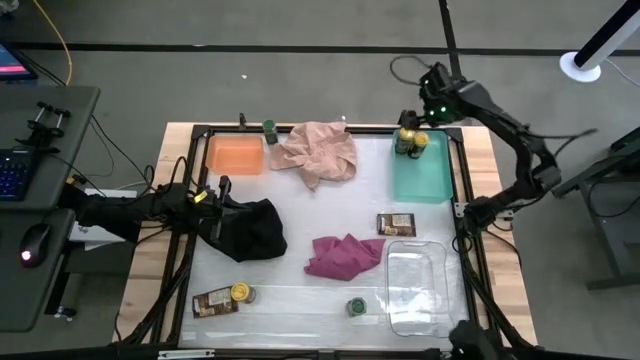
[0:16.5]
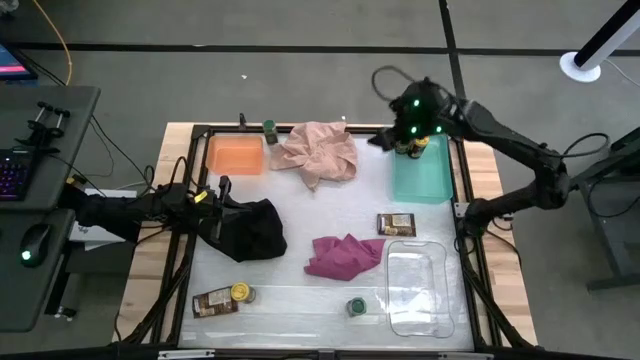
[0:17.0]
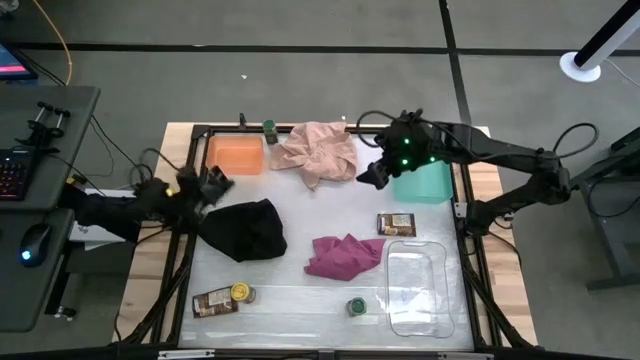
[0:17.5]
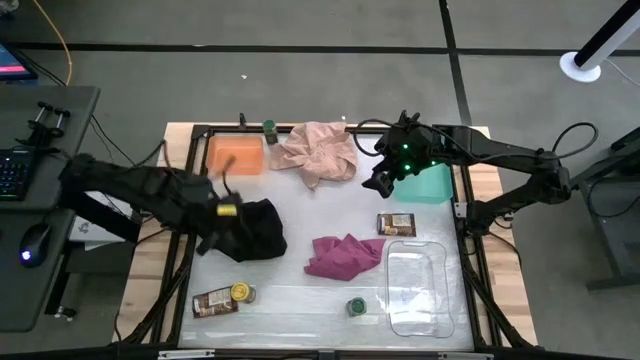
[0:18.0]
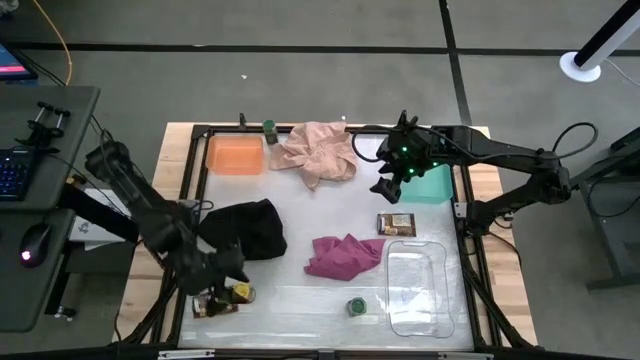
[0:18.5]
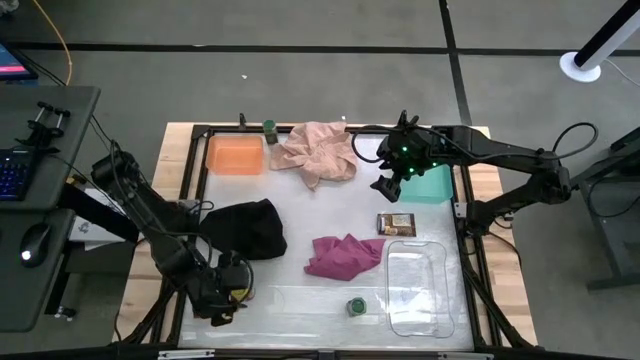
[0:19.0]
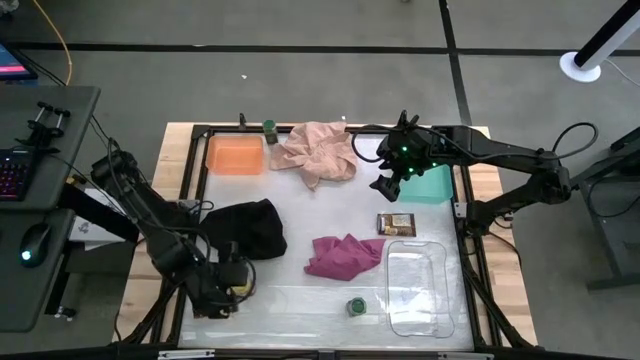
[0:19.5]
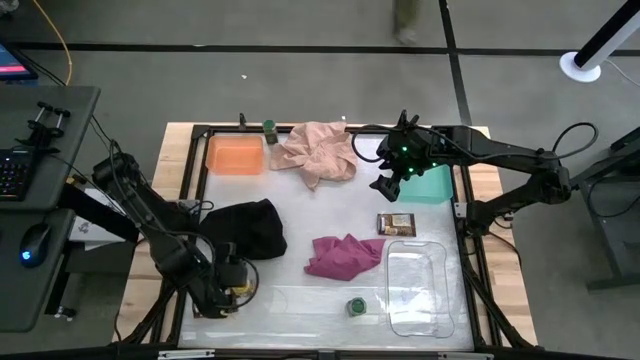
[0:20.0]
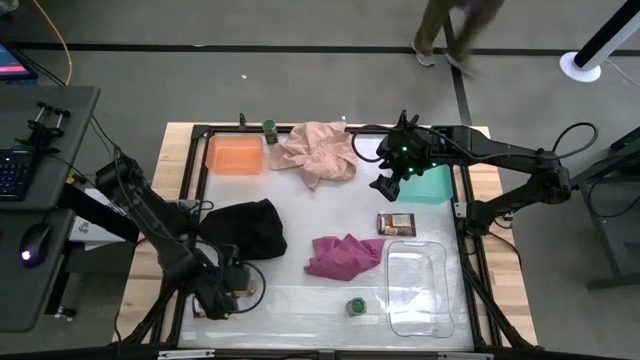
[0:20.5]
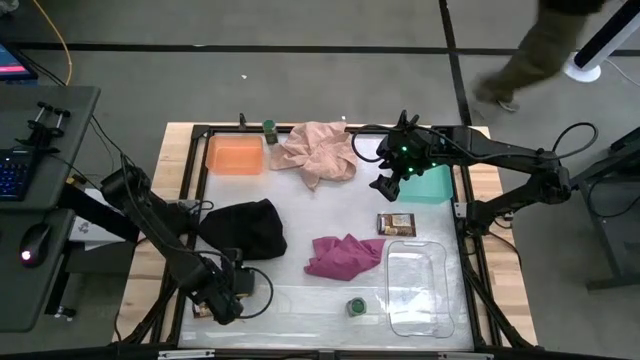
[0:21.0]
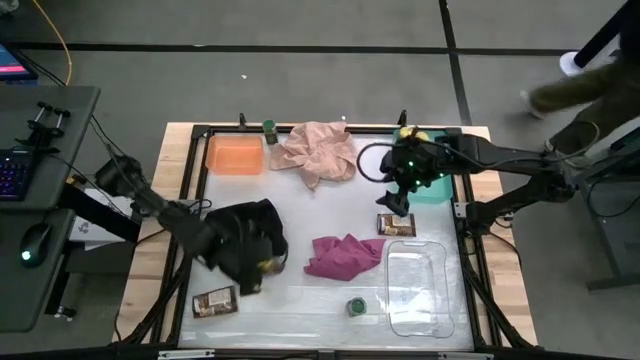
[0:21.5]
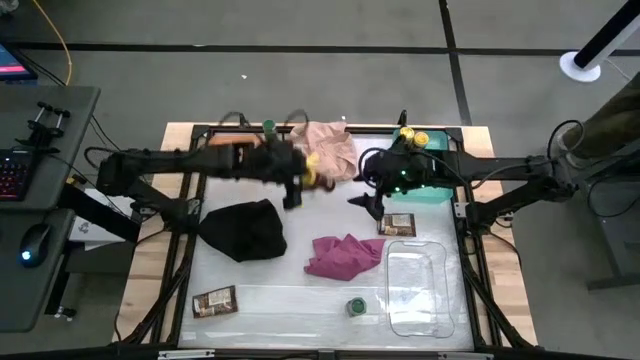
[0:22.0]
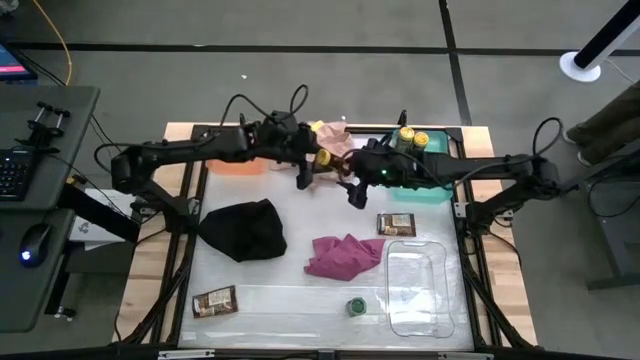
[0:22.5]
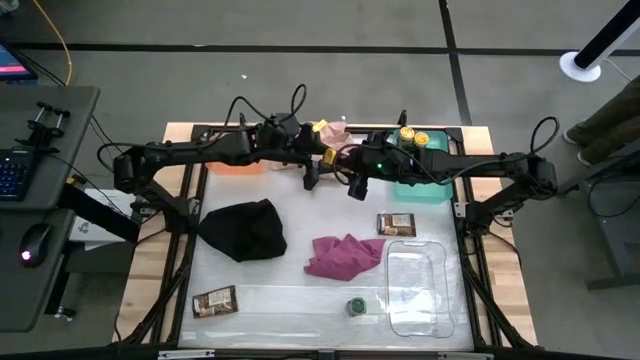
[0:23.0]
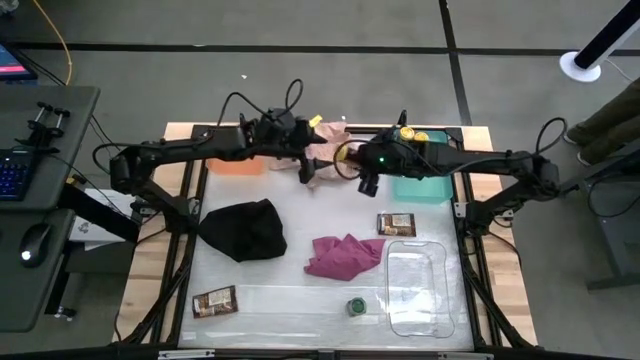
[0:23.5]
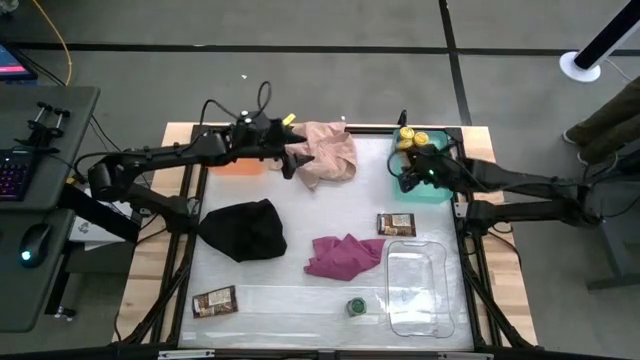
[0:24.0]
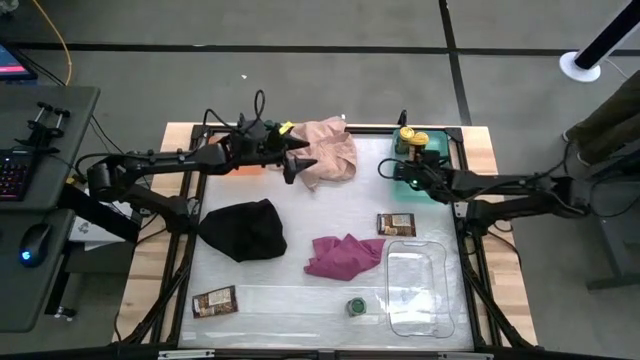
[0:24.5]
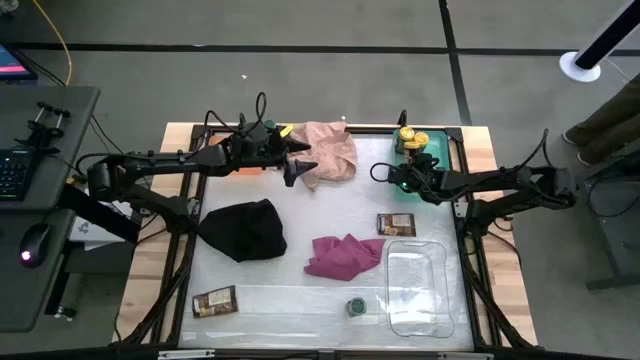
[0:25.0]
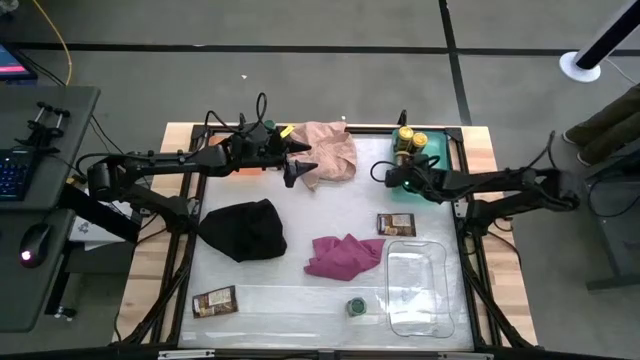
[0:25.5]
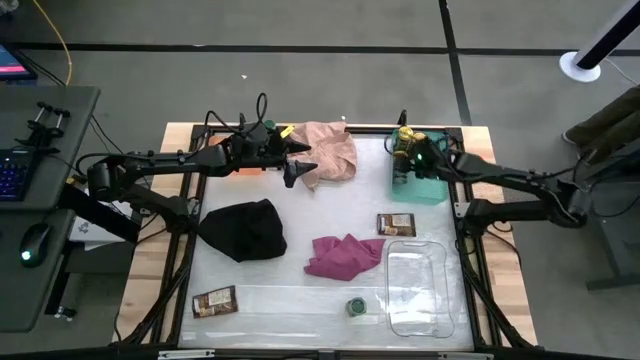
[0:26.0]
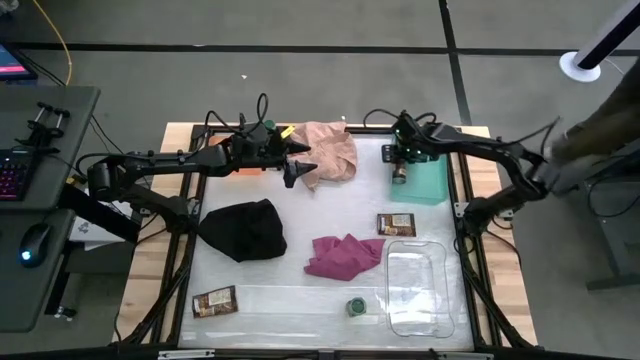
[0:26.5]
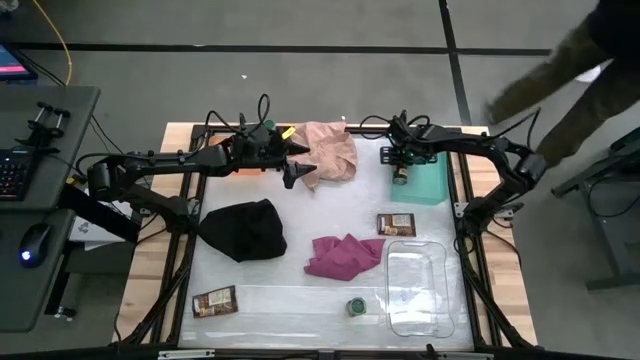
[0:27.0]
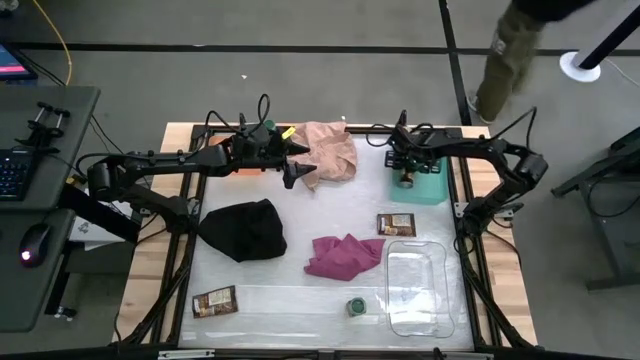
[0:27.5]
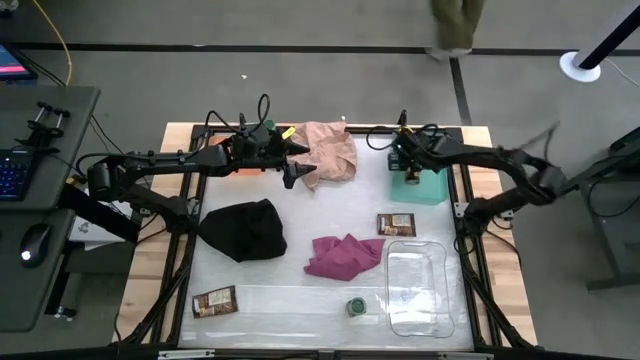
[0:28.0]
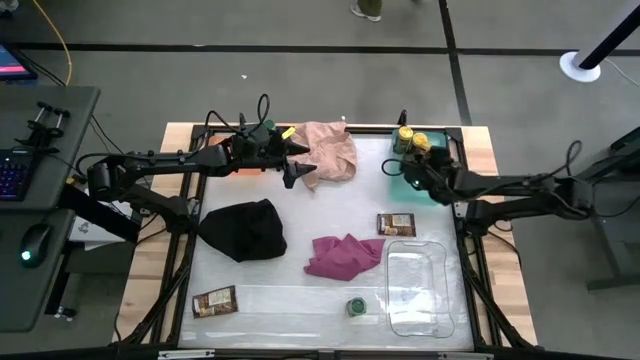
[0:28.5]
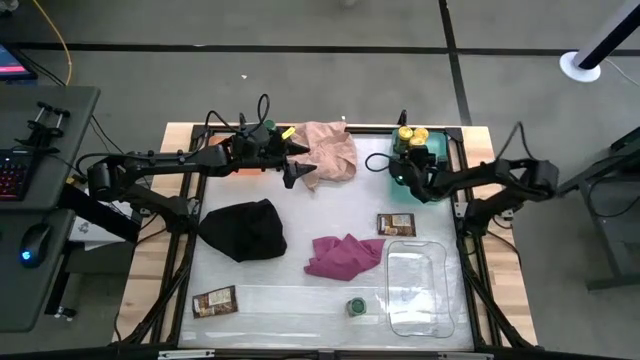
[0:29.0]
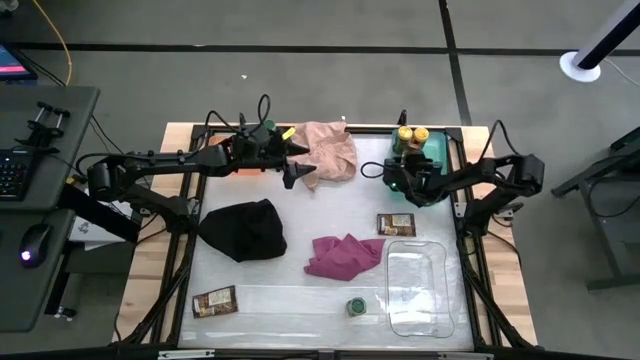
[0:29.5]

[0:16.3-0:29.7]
Task: Sort spices by type
Put the yellow seasoning bottle into the blue bin

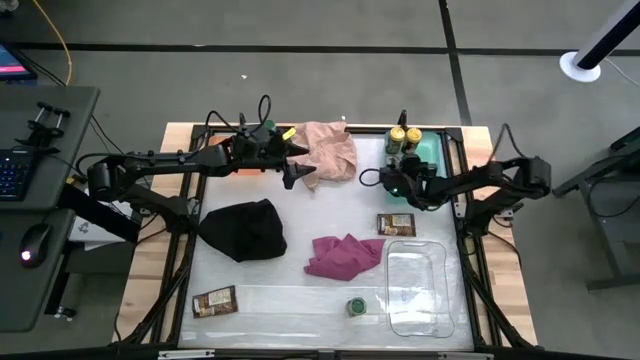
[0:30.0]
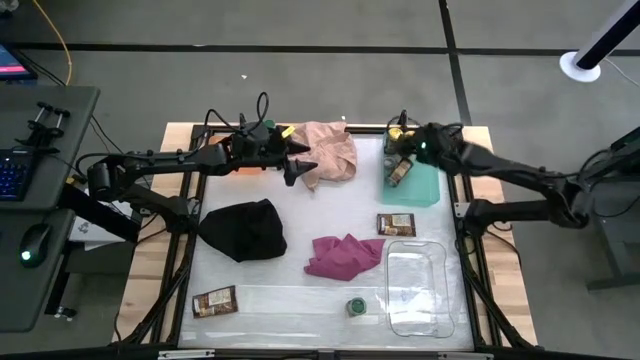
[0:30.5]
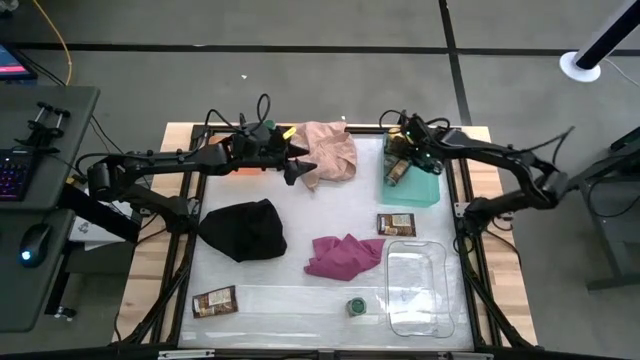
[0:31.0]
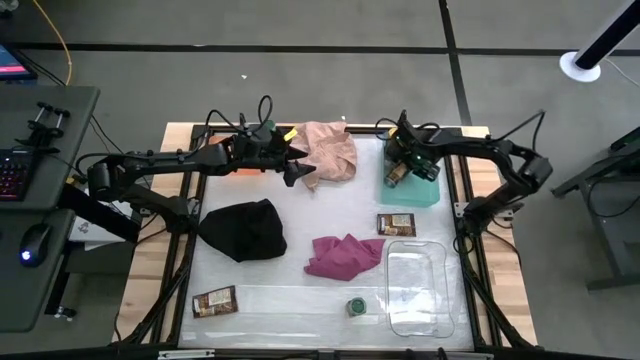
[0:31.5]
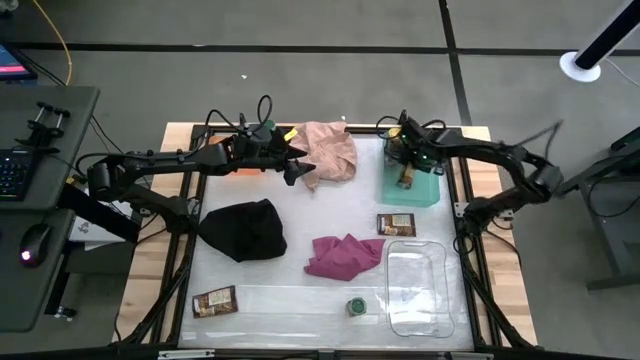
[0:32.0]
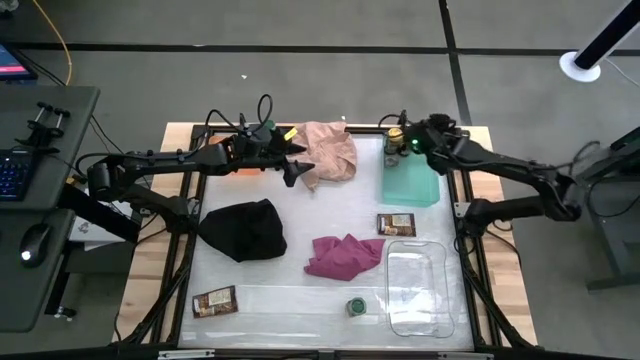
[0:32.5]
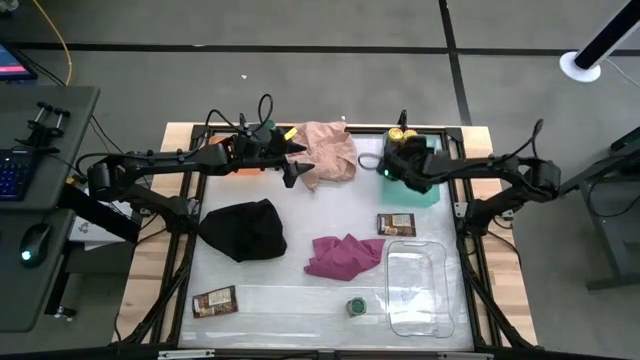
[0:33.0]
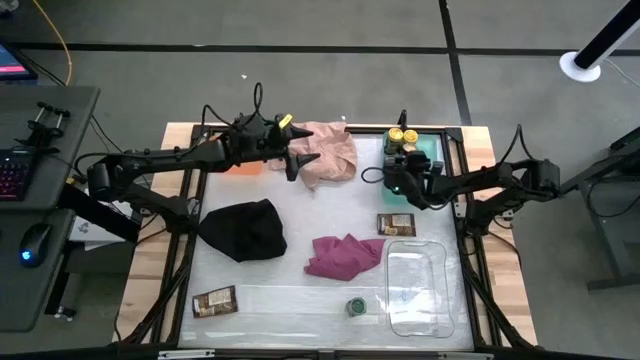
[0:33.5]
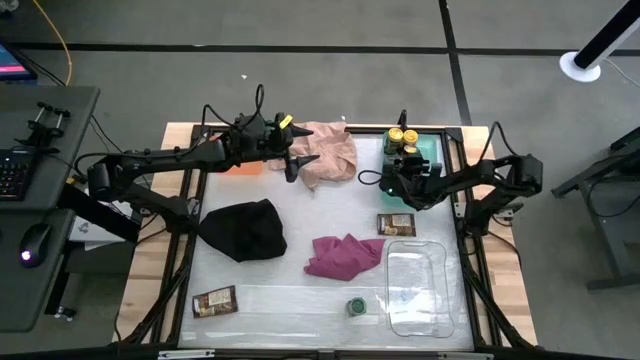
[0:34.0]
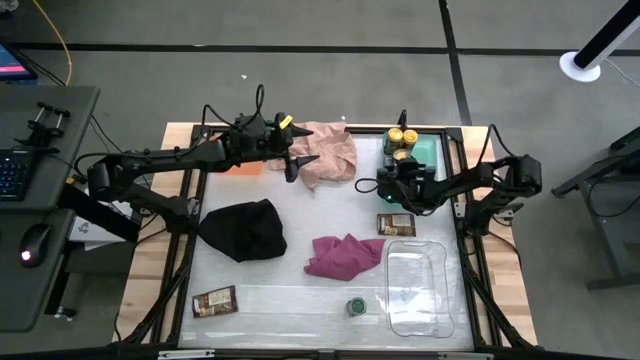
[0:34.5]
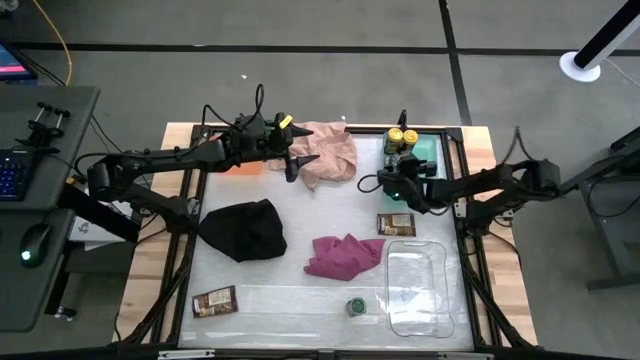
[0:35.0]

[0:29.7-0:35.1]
Put the yellow seasoning bottle into the blue bin

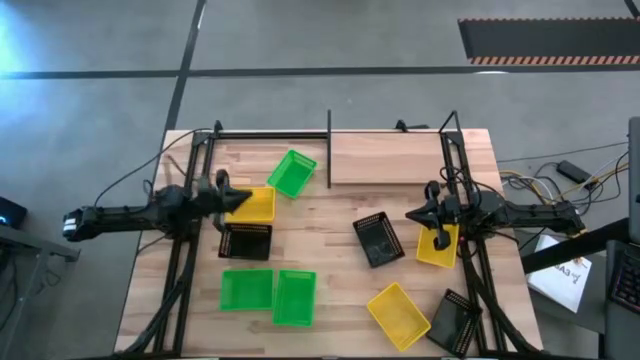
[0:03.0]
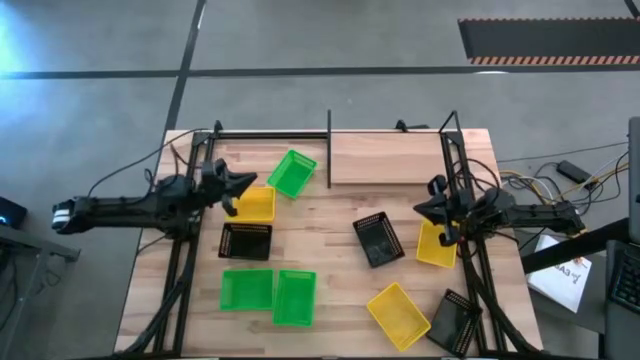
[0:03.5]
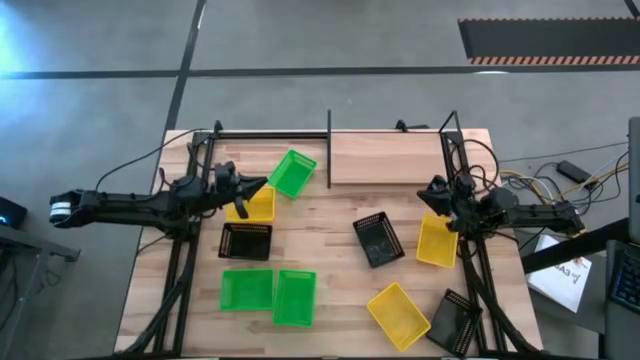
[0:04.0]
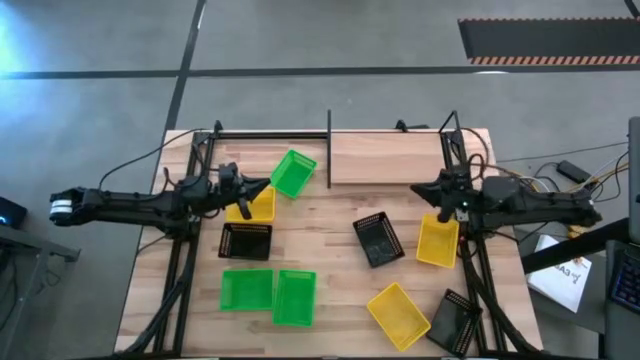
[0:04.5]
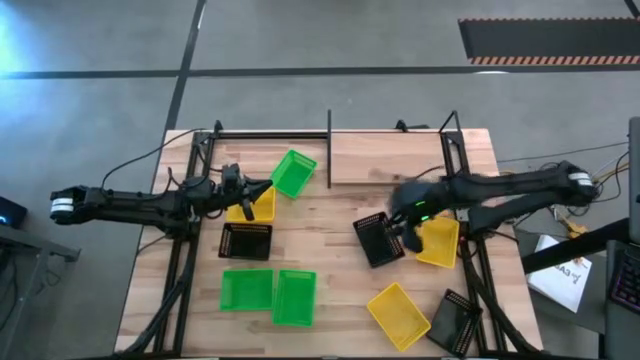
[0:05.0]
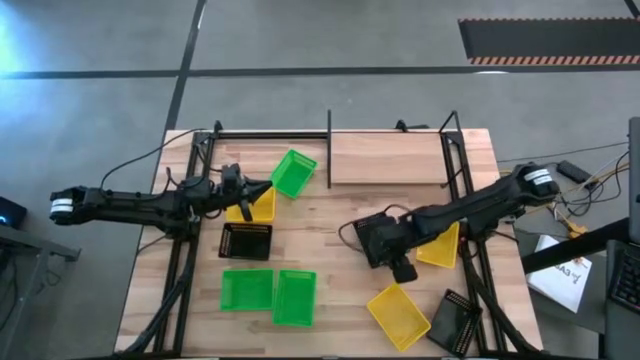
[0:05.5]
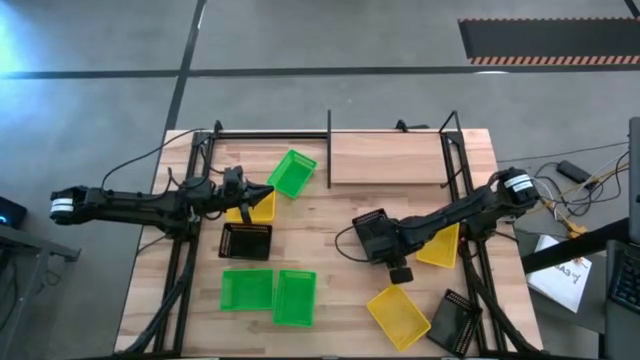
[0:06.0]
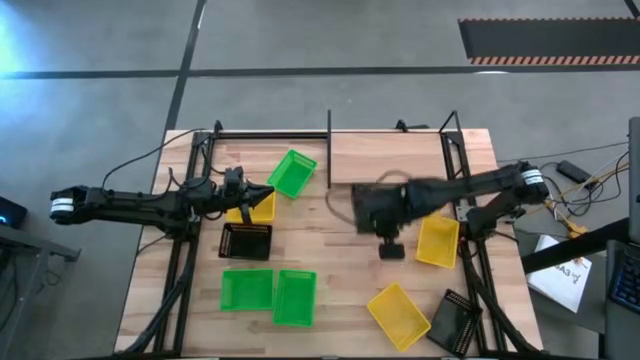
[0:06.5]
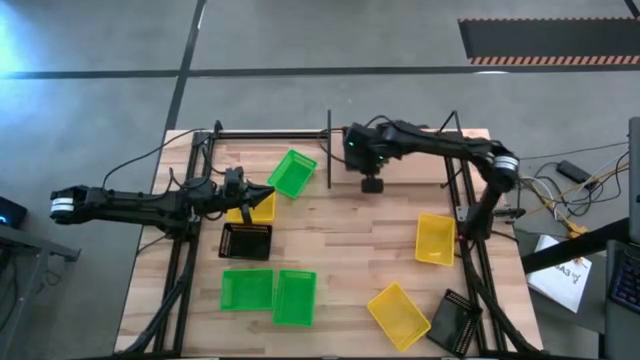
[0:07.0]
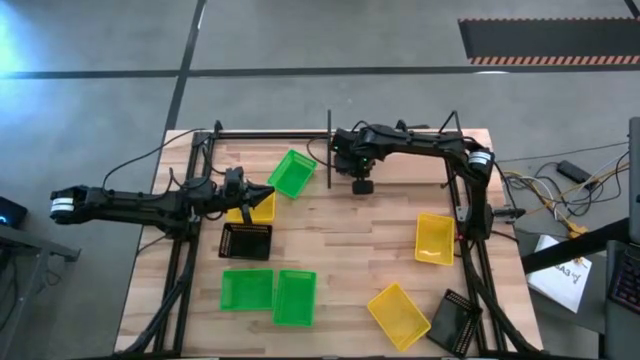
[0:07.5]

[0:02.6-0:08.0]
Task: Stack baskets on shelf by color
Put the top right black bin on the shelf
